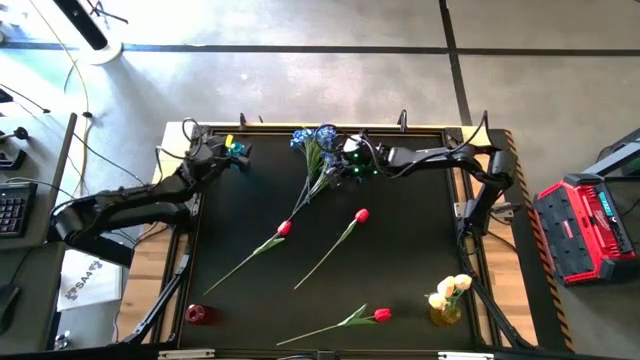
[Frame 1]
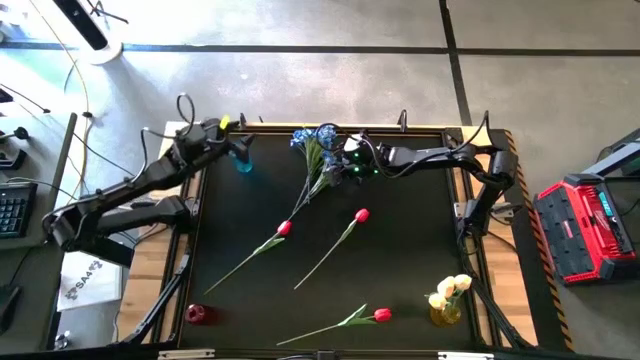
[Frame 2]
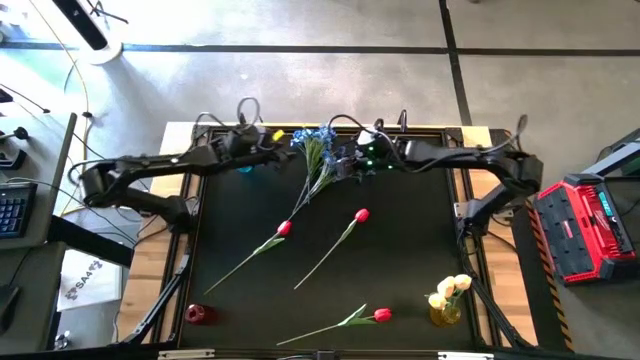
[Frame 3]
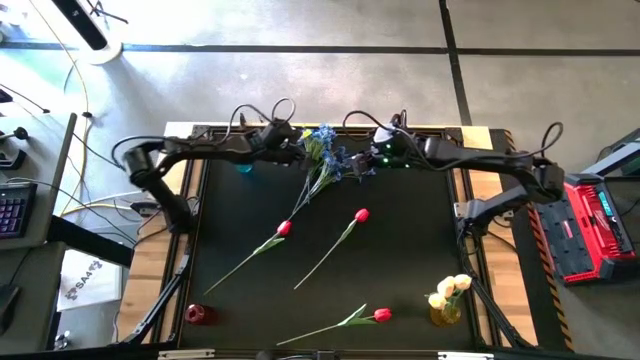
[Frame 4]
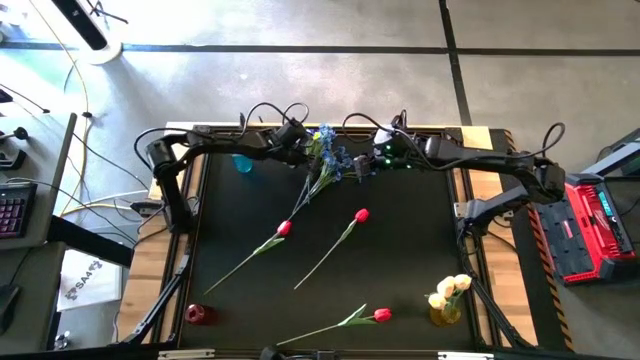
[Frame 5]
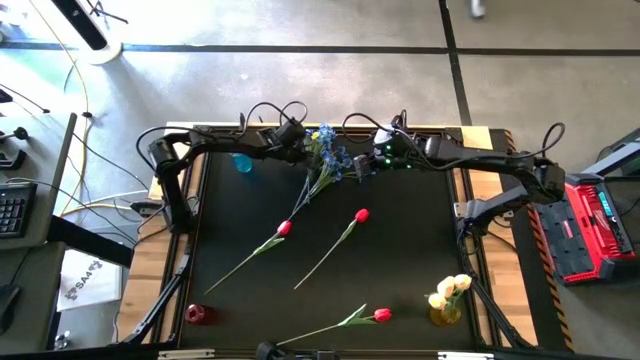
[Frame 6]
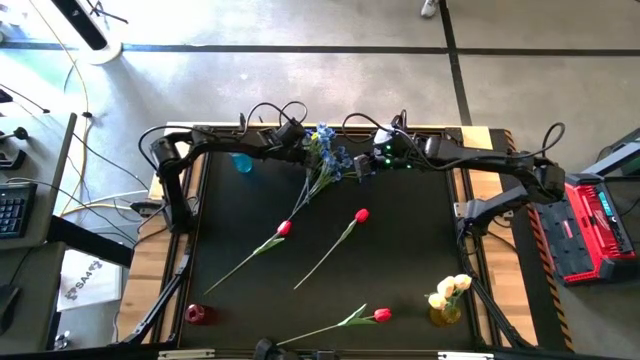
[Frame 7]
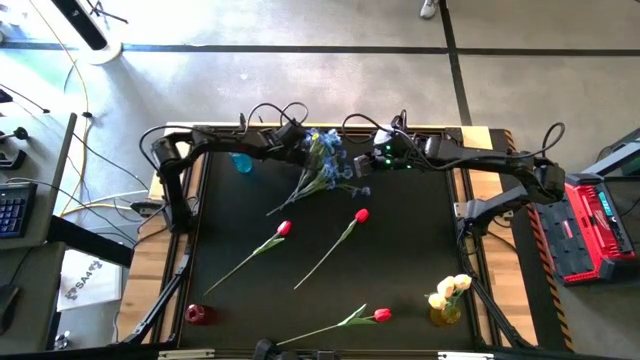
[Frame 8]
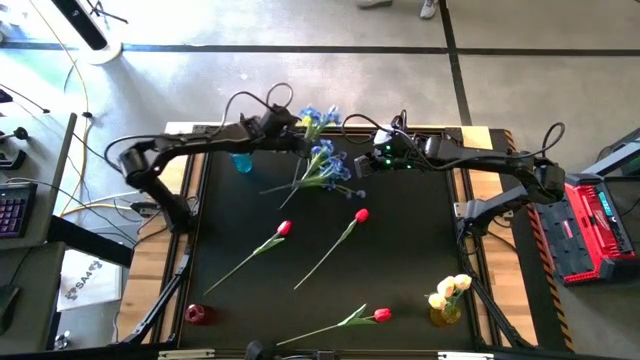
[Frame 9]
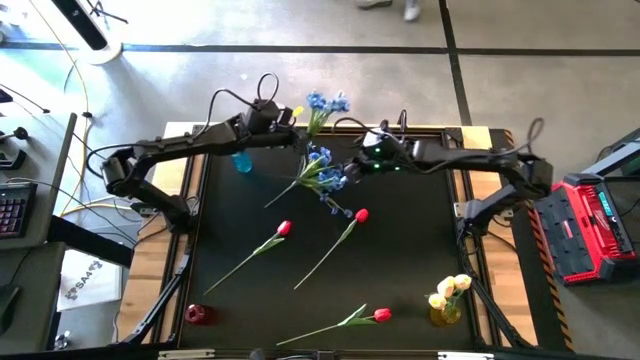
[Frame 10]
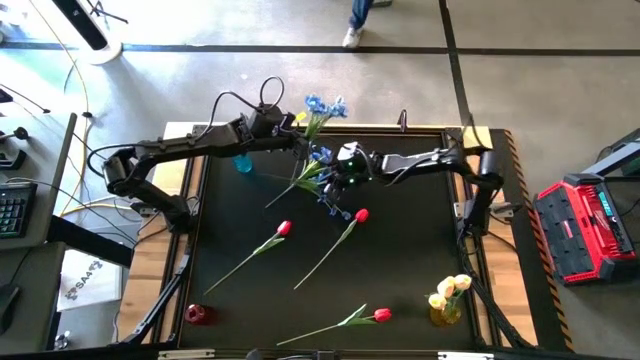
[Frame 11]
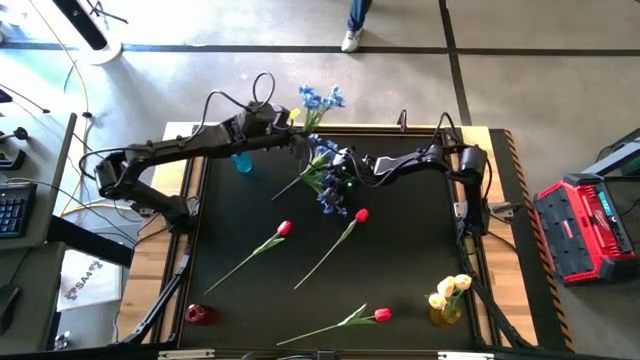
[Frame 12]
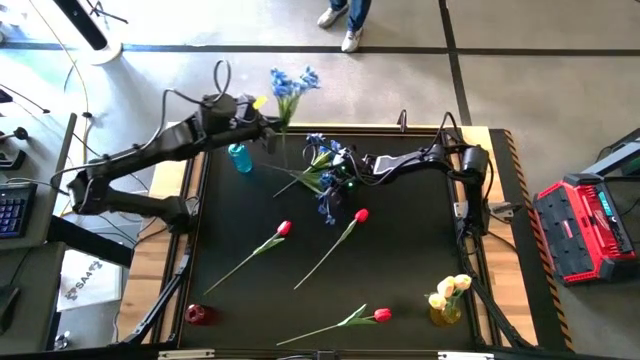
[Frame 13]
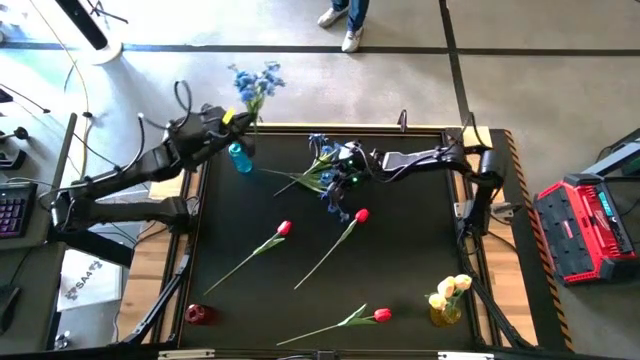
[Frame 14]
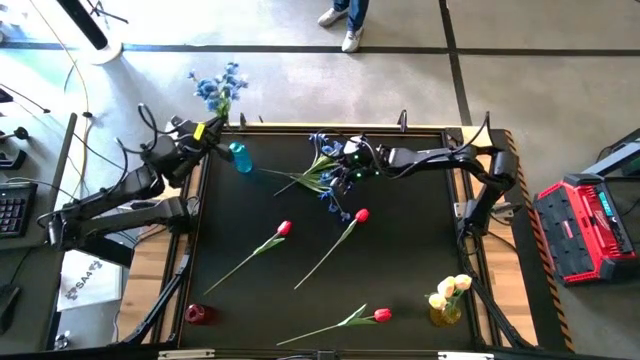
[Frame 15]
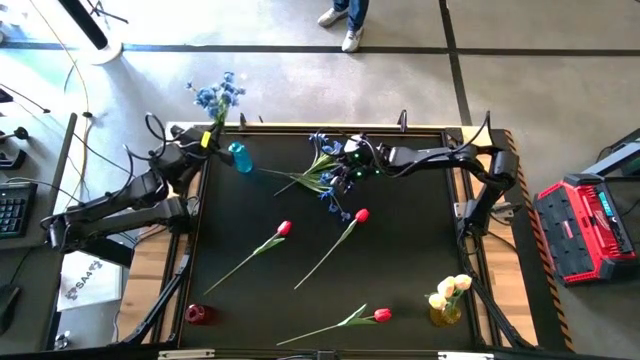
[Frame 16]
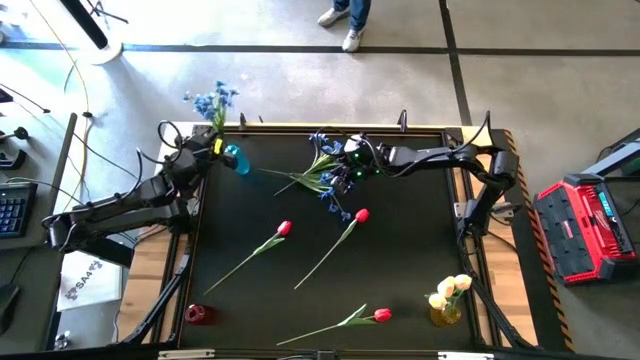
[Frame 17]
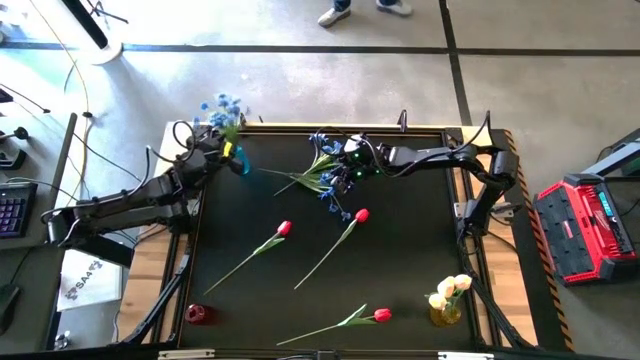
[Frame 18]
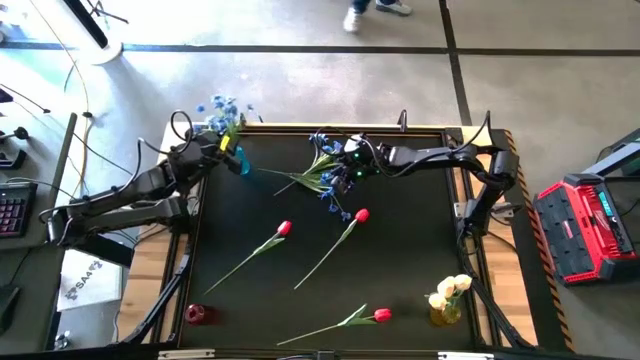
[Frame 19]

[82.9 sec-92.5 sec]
Task: Sort flowers into vase by color
Put the top left blue flowers into the blue vase

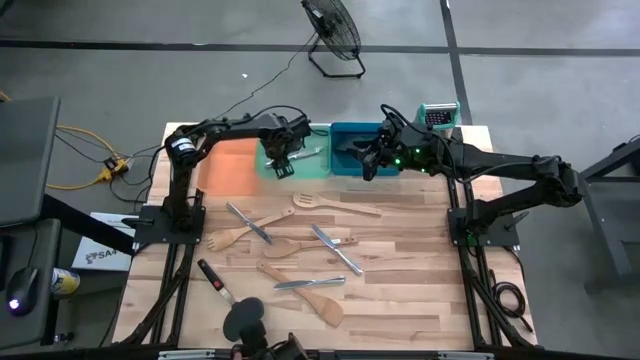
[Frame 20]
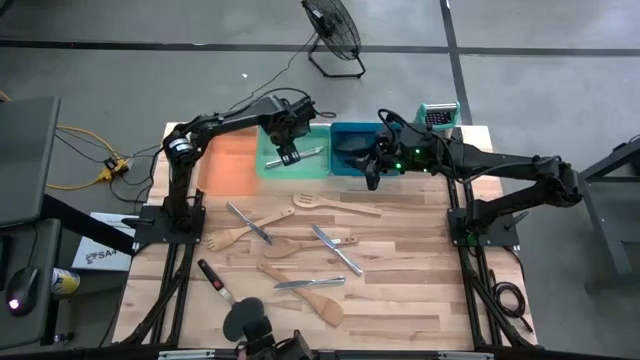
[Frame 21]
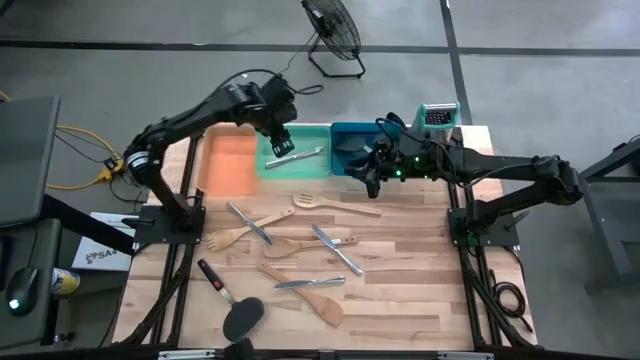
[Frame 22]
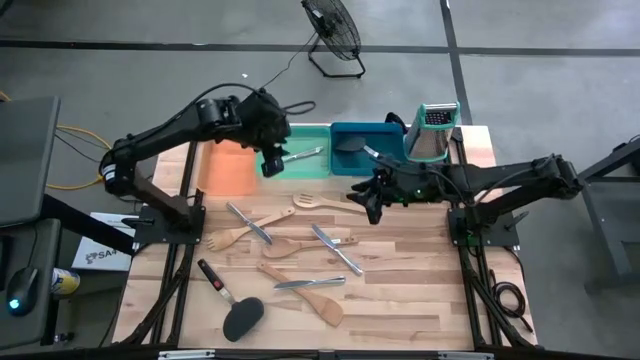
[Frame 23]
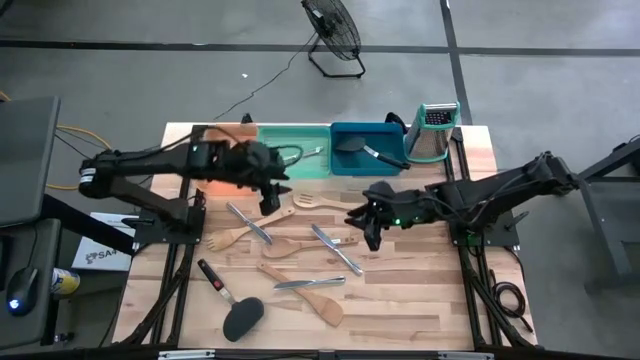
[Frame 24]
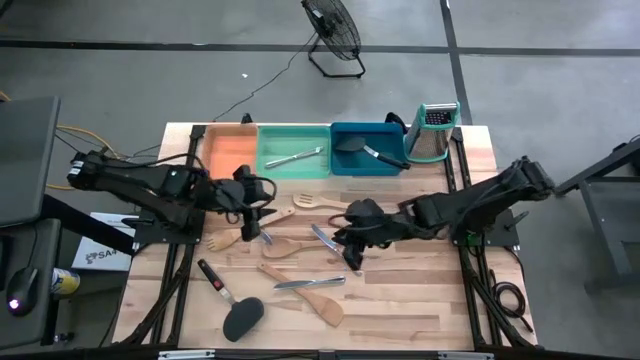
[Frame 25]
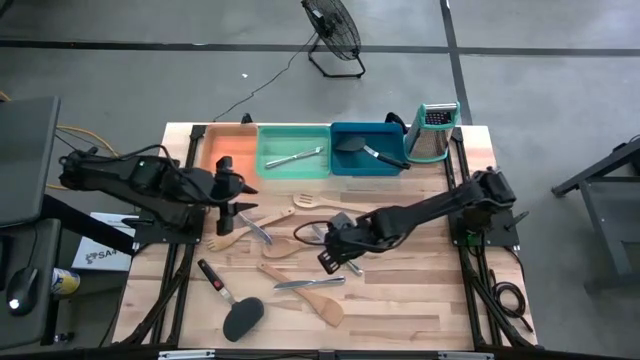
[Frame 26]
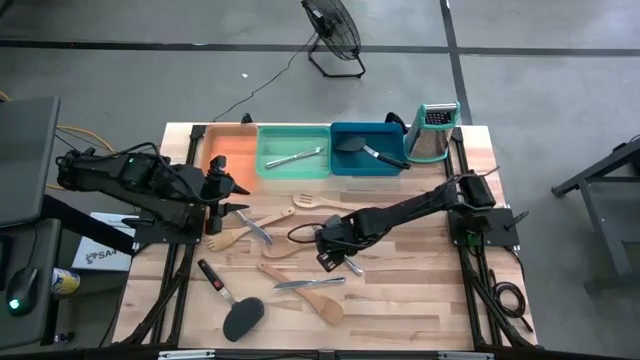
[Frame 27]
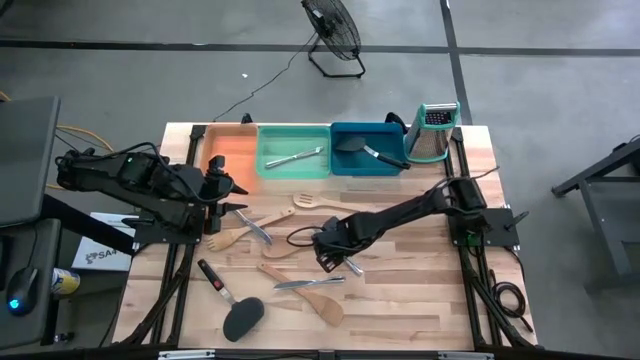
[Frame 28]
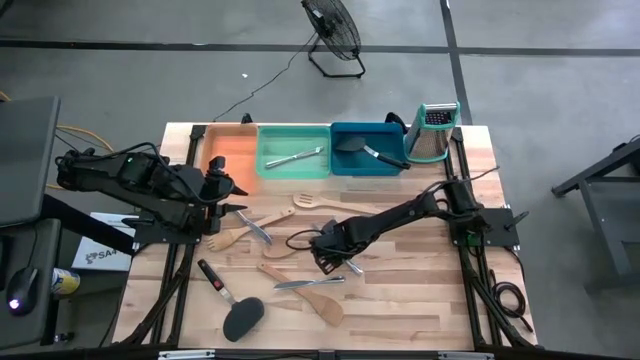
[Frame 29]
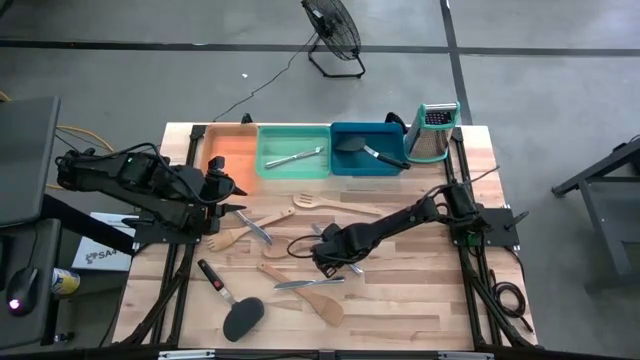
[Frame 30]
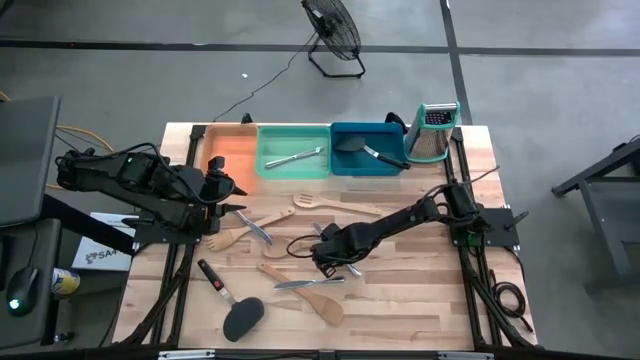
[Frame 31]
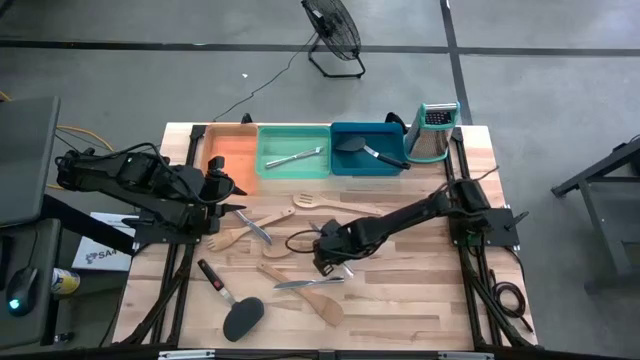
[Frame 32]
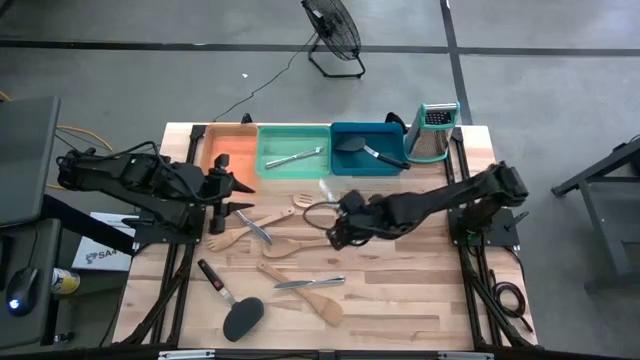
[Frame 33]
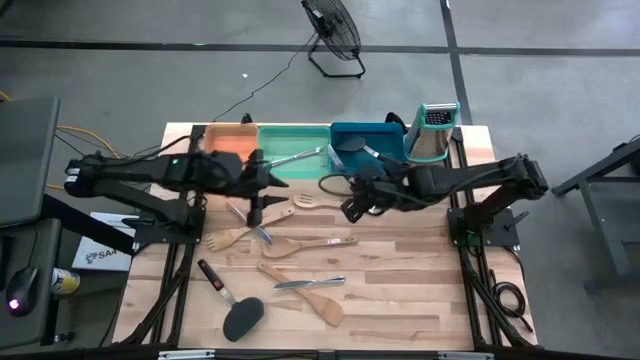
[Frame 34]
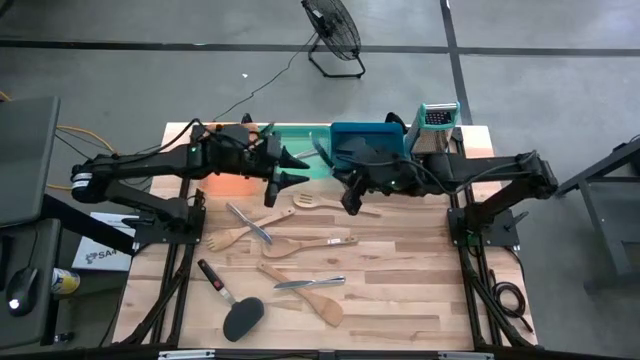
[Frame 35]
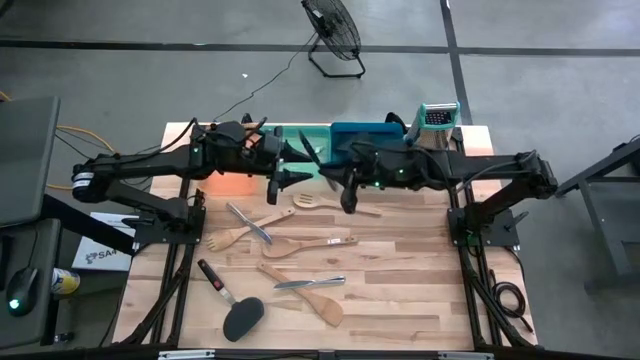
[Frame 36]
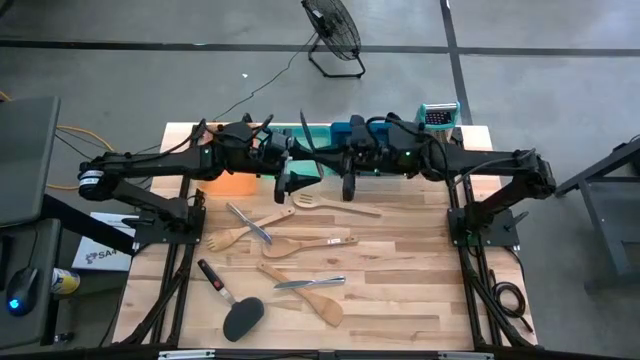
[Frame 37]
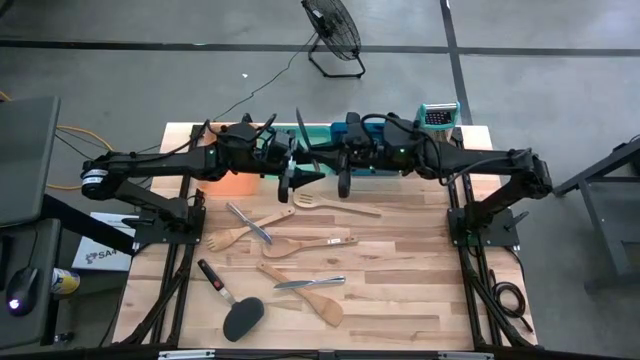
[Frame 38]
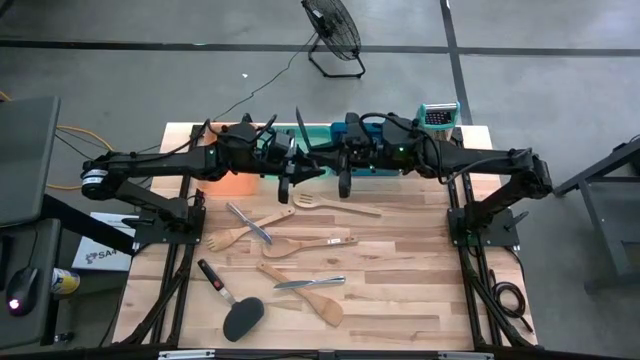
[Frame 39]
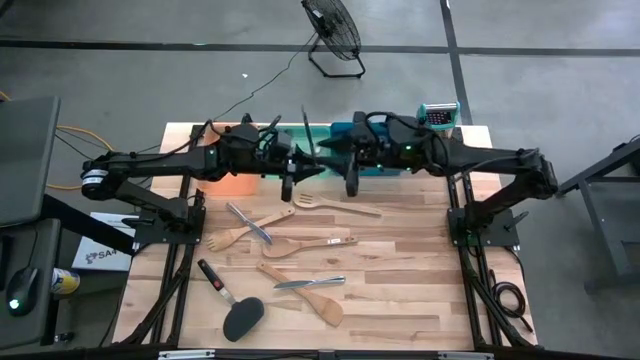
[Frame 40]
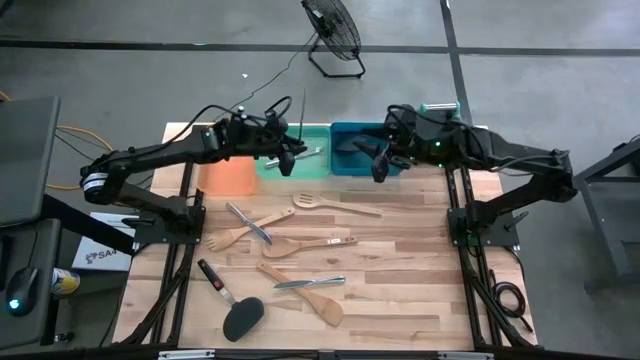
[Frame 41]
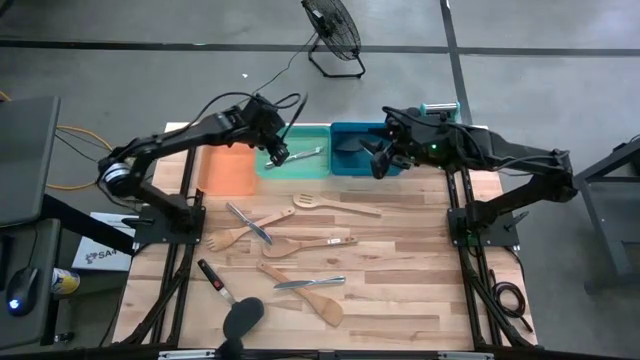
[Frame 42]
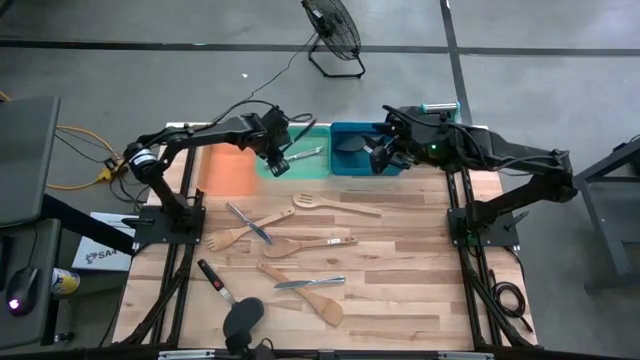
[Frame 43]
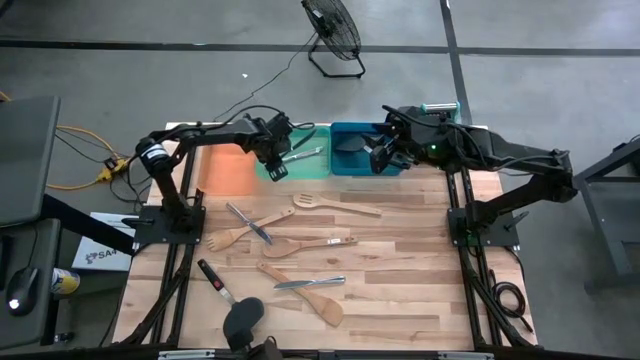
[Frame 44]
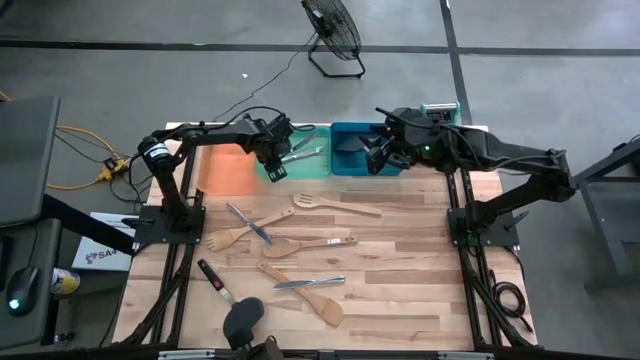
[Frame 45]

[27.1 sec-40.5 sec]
Task: Pick & Place Kitchen Items
Put the silver table knife into the green bin
